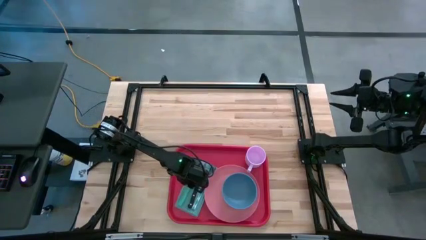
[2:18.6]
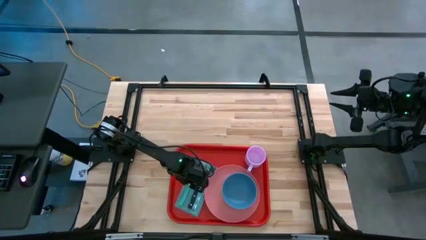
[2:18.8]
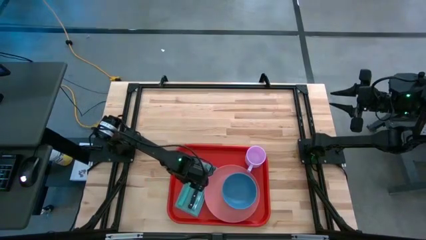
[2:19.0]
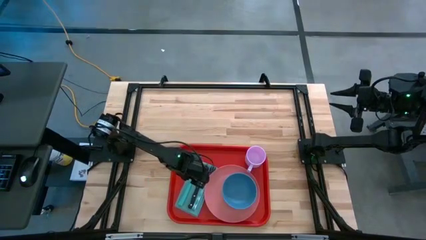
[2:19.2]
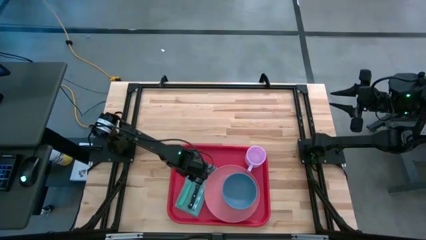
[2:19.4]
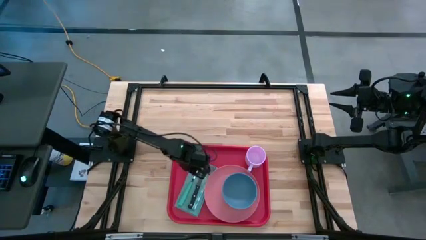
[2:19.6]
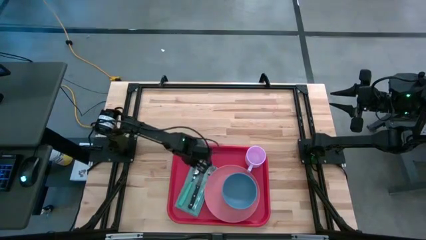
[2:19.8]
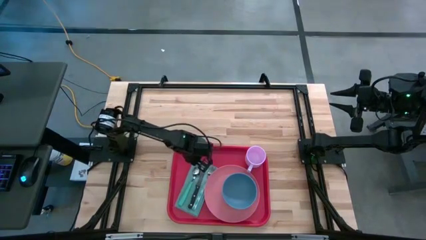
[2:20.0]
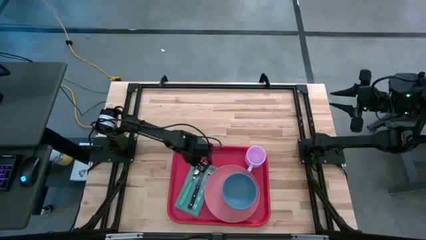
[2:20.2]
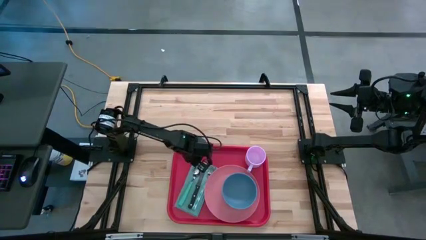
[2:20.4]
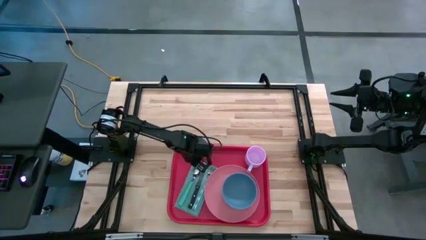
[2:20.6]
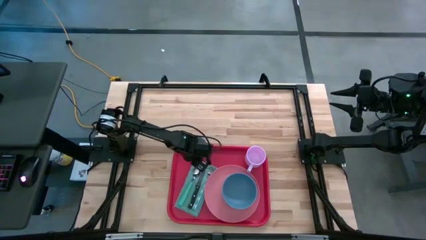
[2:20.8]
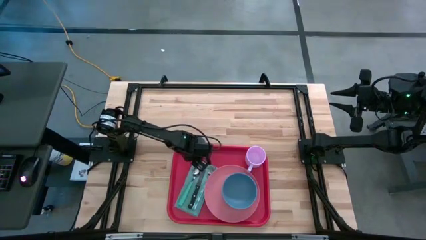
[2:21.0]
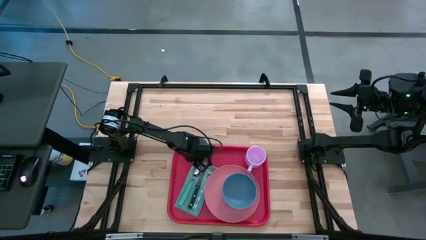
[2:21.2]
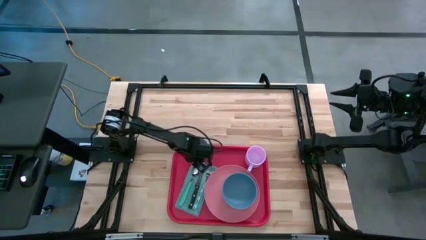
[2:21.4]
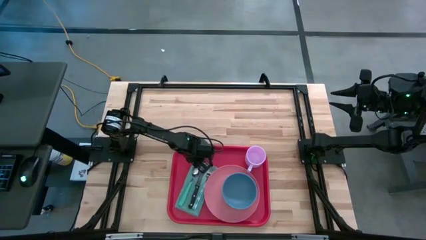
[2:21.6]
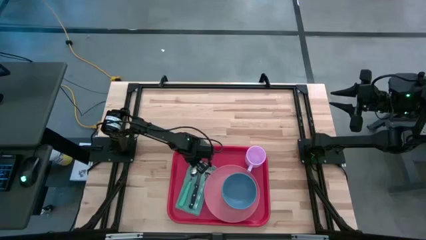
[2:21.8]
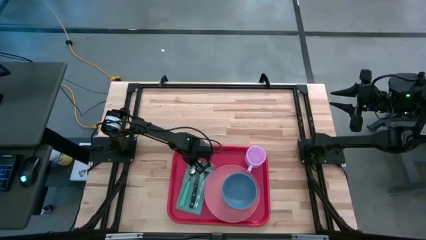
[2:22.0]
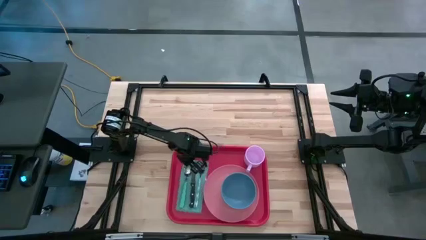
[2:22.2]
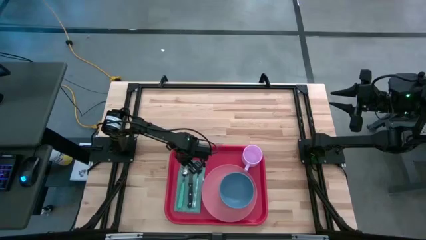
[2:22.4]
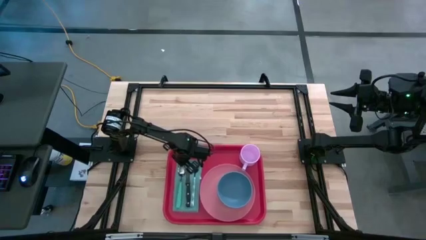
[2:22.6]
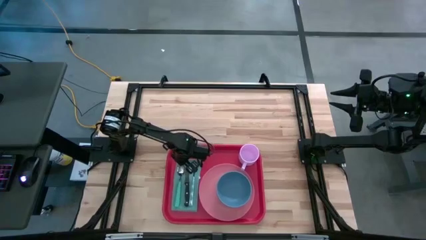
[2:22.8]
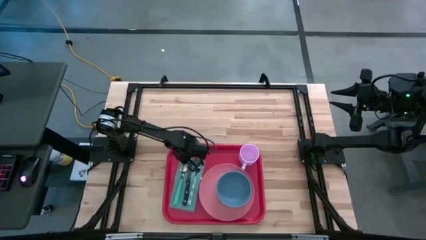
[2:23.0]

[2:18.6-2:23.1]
Task: Set up tray
Adjust the blue napkin

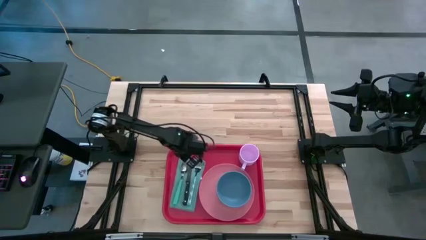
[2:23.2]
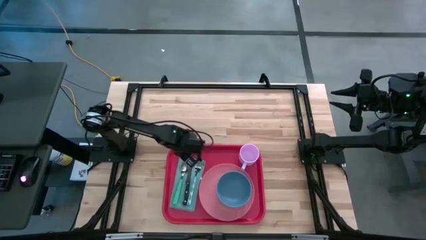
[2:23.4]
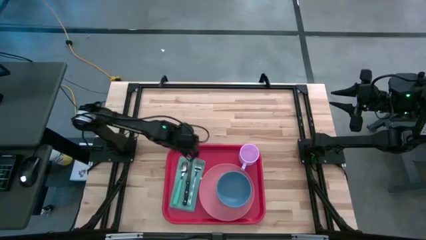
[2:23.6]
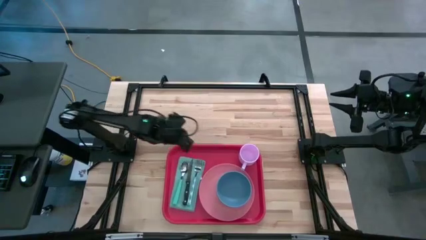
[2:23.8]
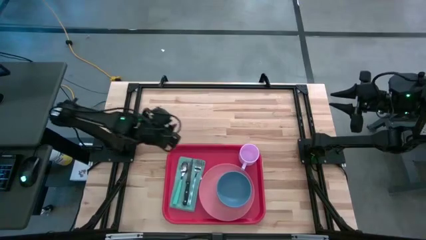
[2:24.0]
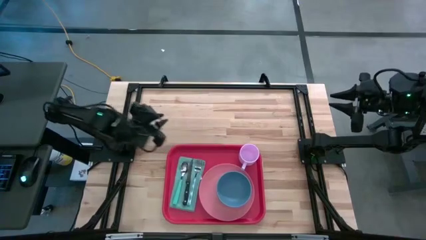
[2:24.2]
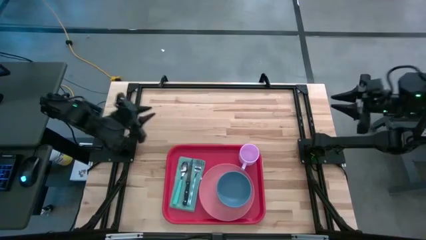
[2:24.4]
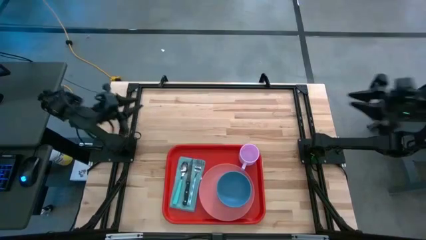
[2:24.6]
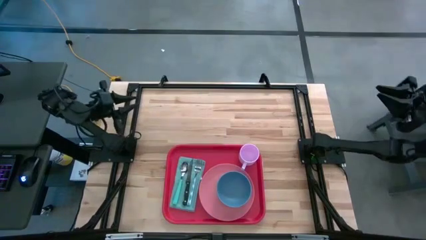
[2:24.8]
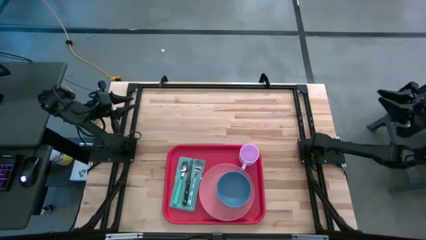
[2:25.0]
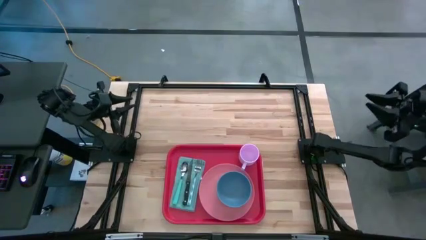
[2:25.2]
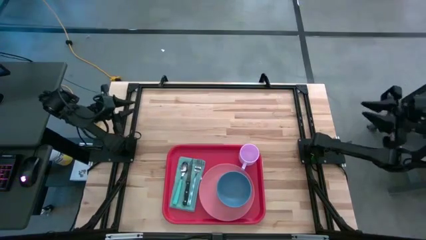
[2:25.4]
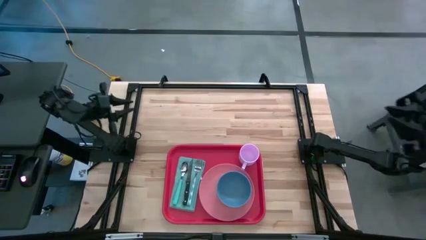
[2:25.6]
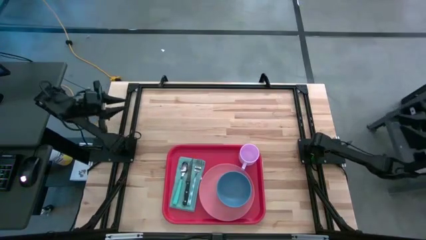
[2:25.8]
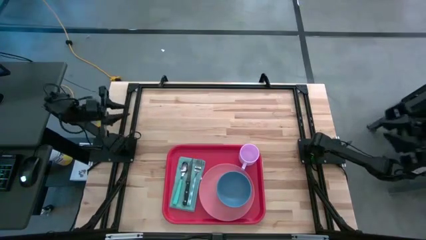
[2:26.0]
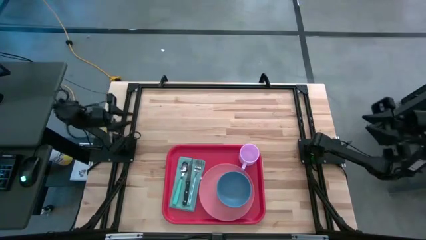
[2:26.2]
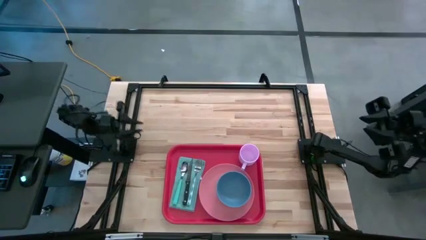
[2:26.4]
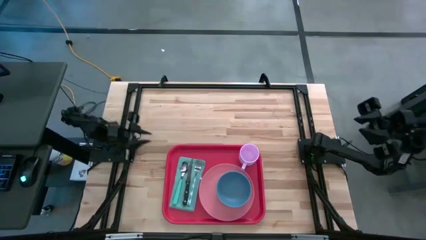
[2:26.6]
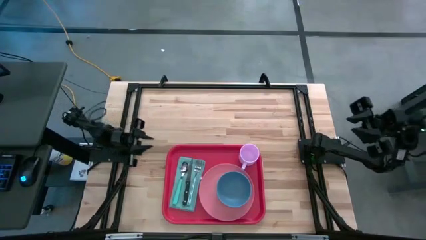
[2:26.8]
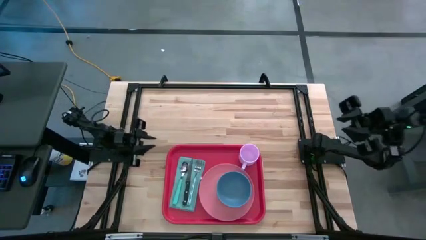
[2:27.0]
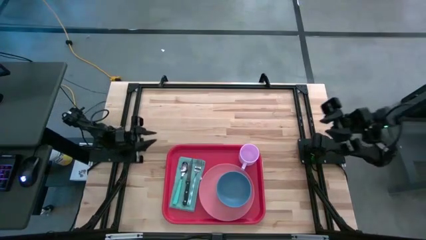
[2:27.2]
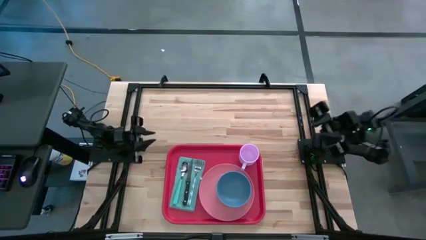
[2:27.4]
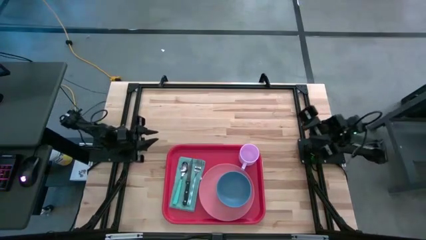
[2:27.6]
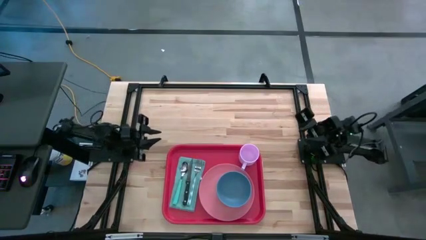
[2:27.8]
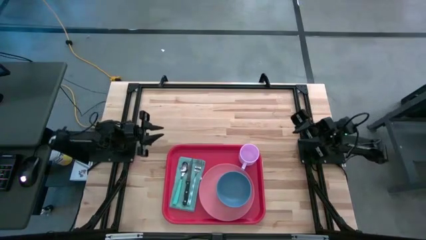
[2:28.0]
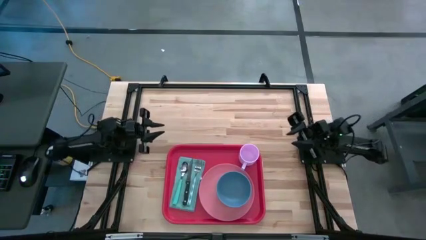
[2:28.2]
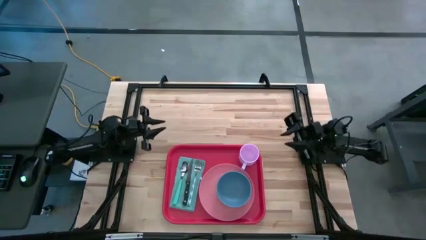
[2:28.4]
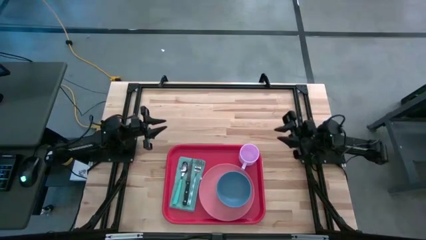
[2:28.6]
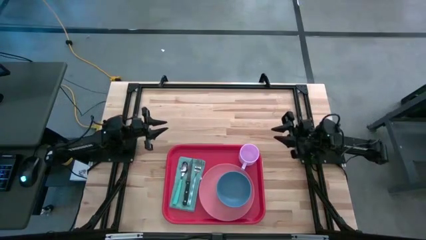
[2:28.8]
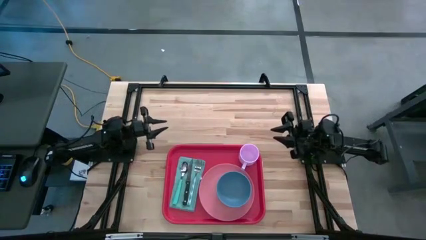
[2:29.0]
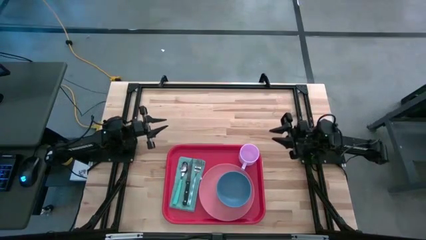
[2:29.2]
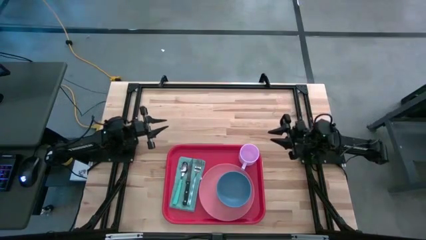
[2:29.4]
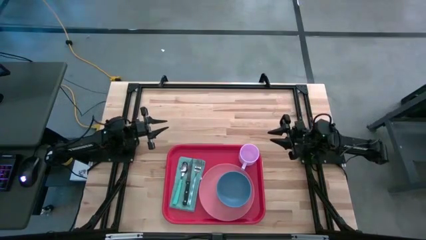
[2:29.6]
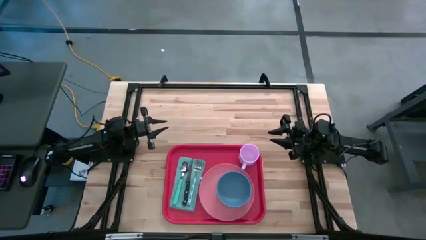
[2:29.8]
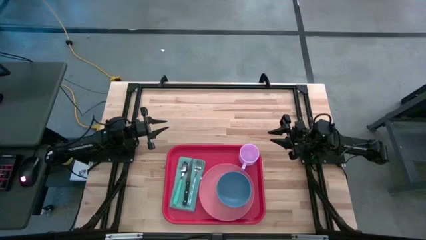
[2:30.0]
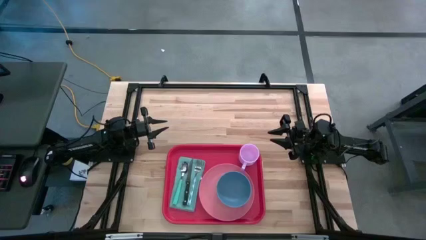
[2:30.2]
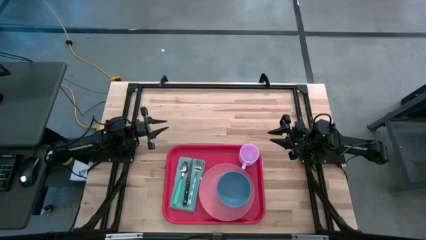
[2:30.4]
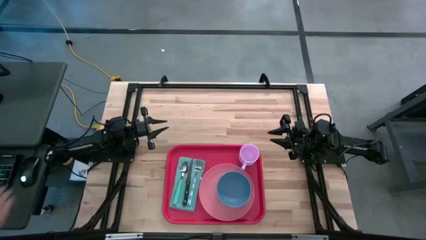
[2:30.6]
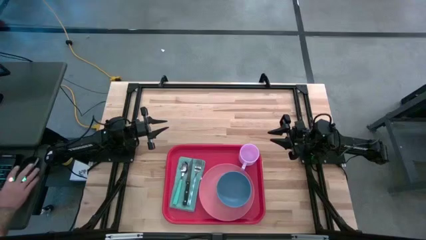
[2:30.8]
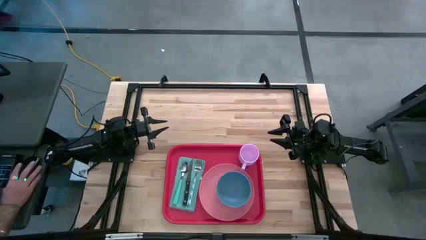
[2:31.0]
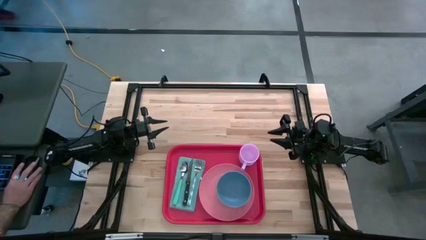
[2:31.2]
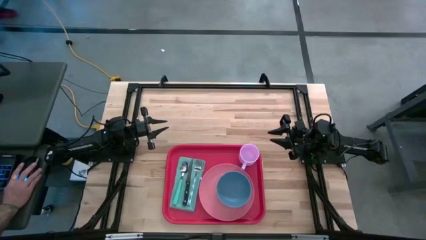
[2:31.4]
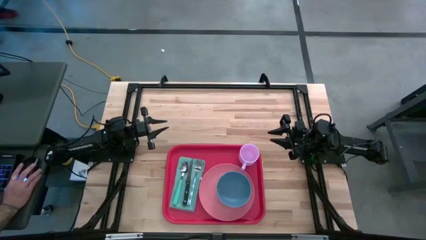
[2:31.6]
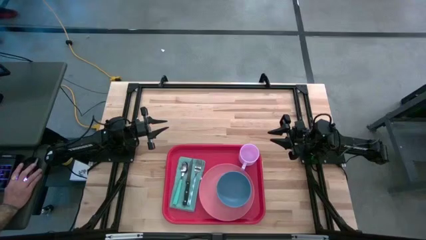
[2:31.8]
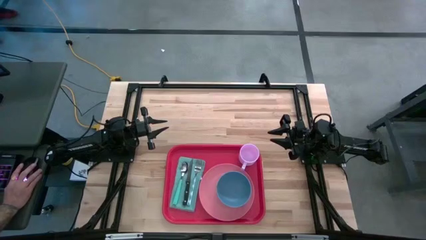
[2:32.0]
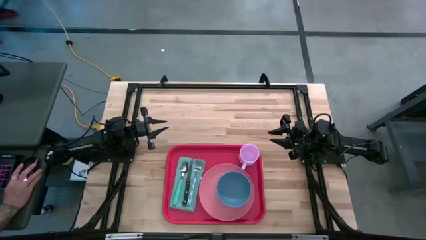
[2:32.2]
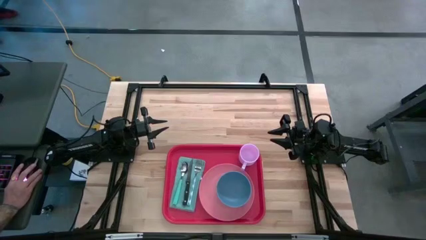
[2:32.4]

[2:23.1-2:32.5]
Return to Home Position

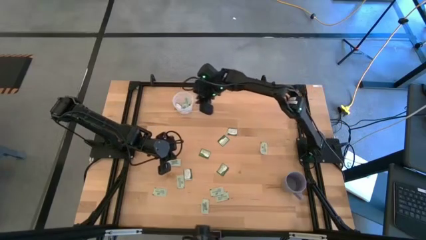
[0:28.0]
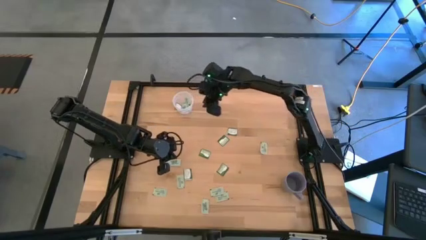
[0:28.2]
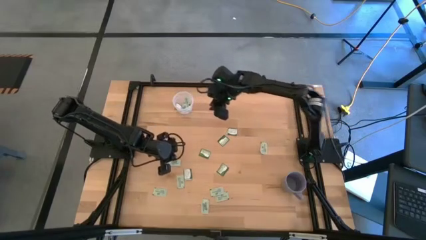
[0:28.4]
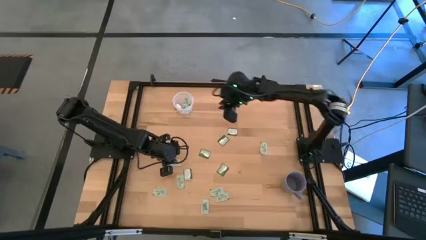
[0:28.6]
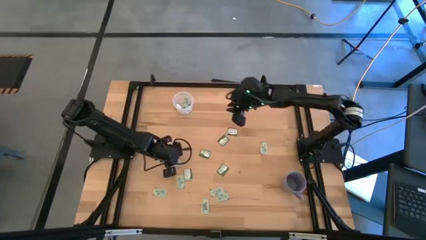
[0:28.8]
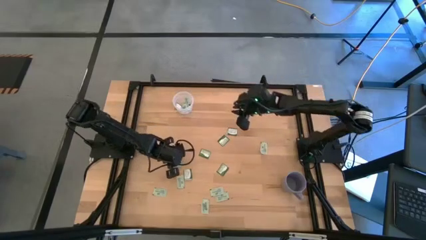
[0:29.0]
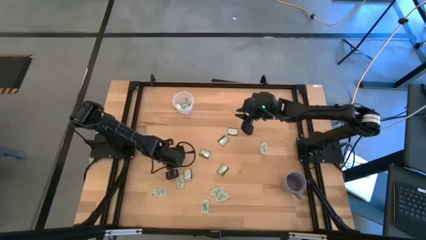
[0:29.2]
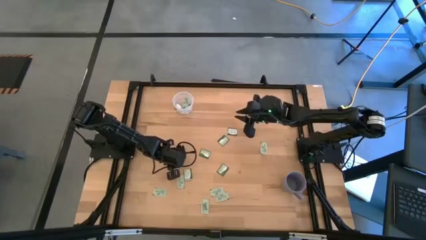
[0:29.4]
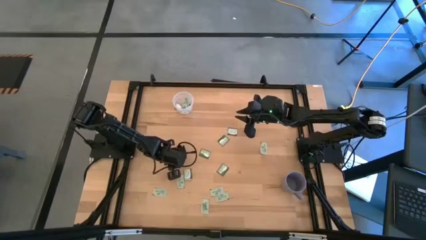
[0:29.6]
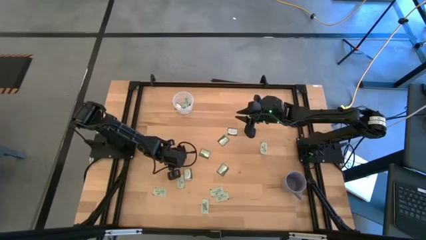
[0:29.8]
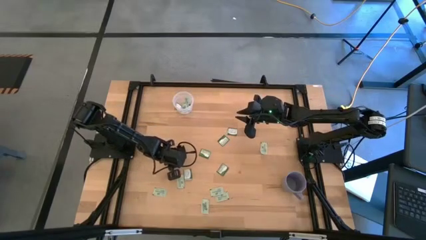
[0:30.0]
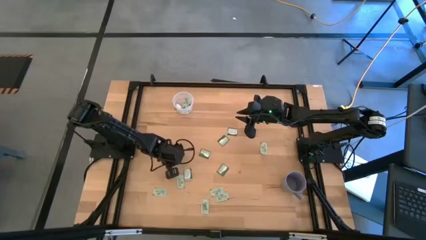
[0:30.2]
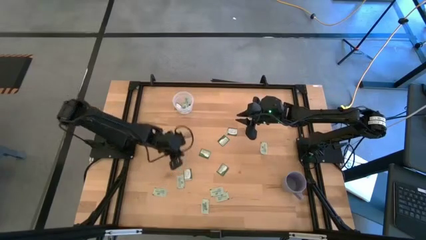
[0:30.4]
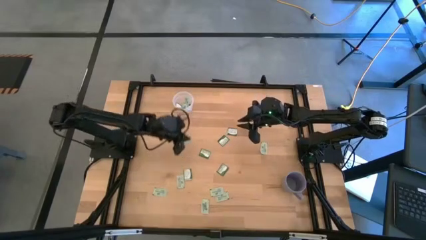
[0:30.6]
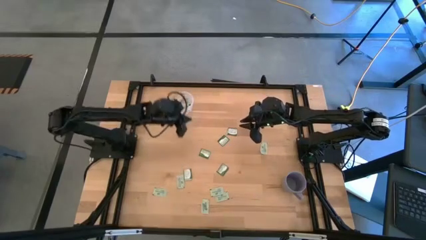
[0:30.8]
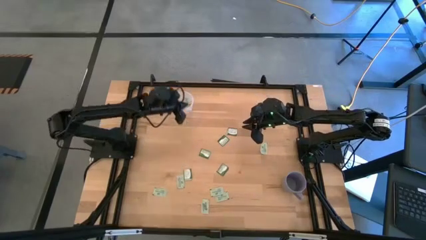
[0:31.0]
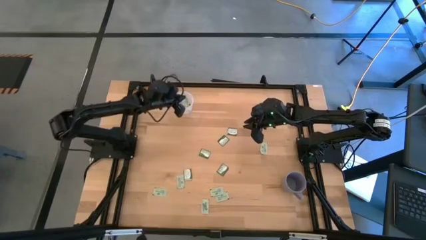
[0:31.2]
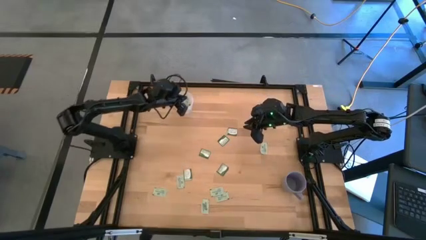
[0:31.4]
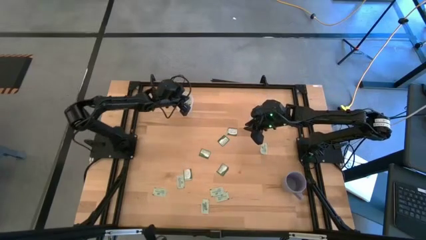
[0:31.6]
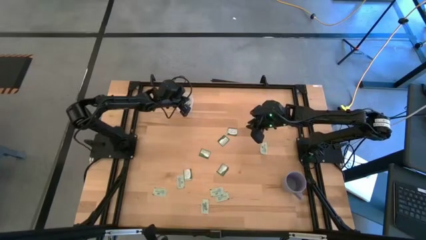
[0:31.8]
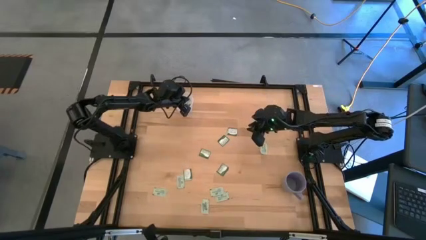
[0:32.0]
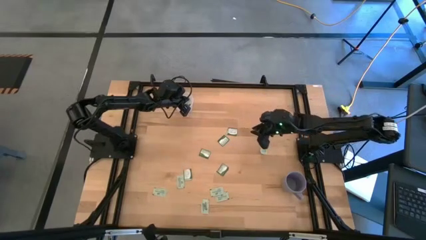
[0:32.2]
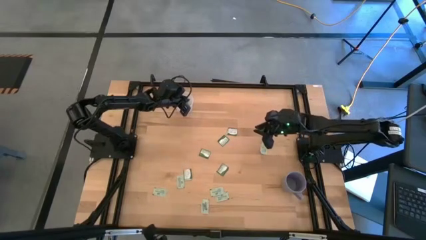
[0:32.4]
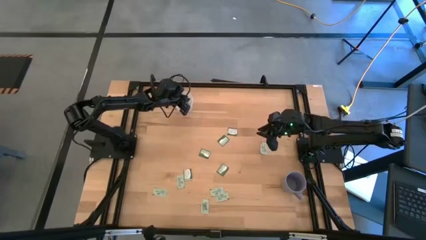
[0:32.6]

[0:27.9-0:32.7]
Task: Pick and place items into bin
Put the stevia packet into the transparent bin
